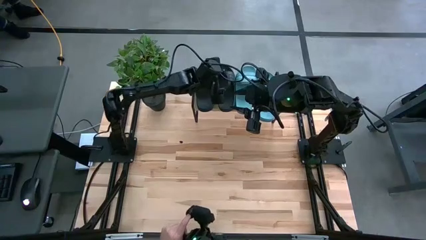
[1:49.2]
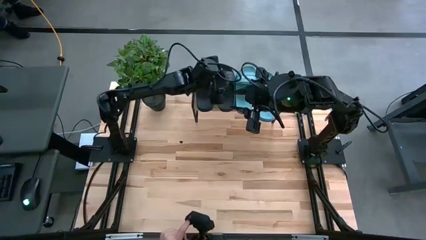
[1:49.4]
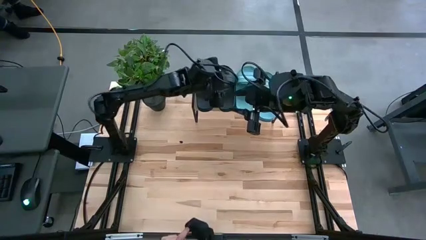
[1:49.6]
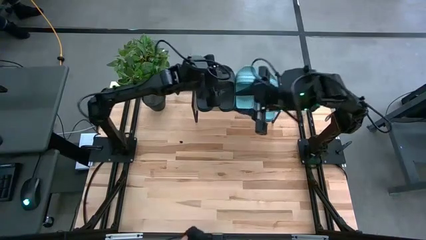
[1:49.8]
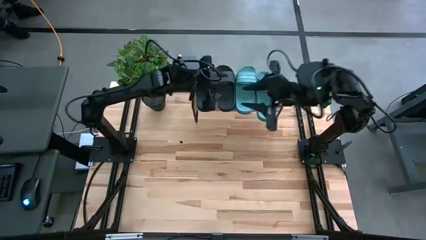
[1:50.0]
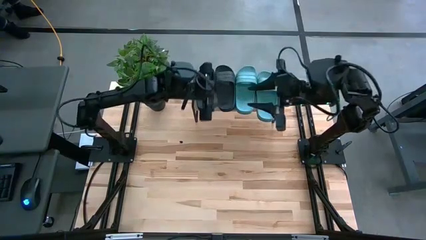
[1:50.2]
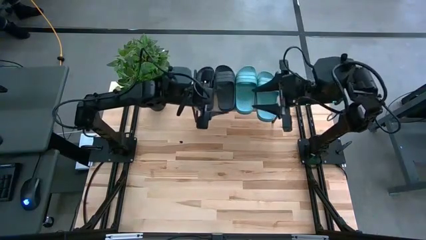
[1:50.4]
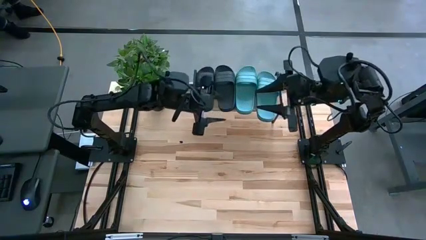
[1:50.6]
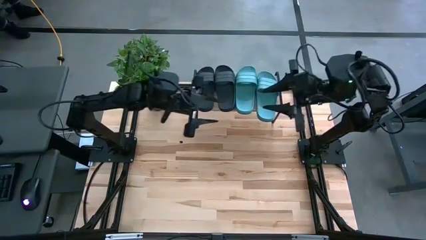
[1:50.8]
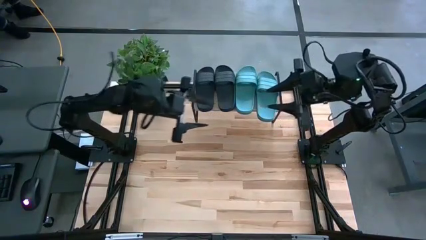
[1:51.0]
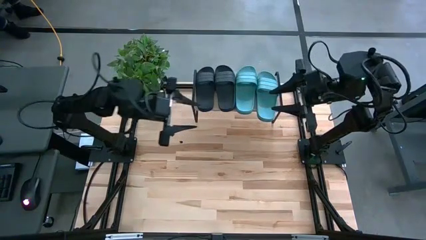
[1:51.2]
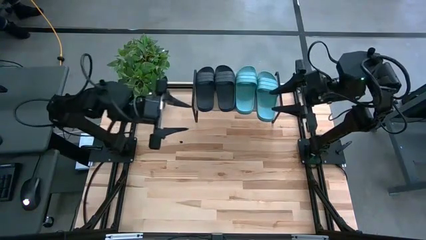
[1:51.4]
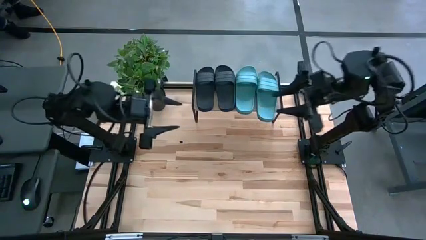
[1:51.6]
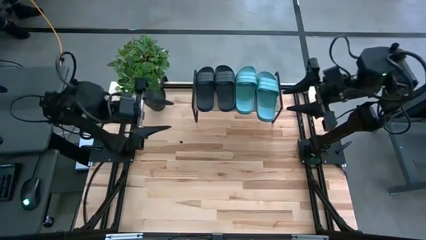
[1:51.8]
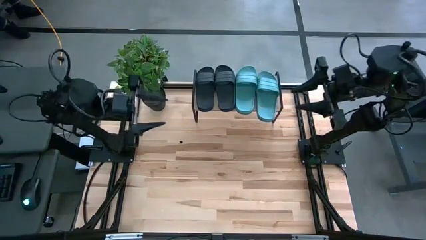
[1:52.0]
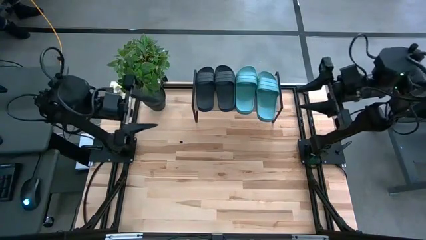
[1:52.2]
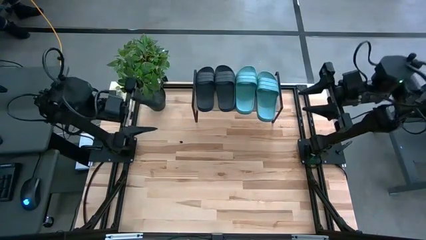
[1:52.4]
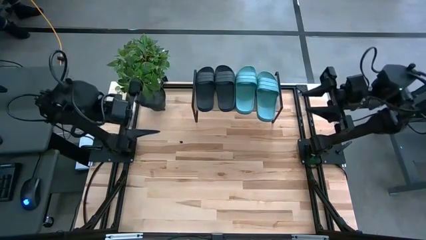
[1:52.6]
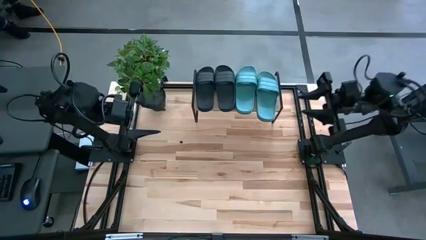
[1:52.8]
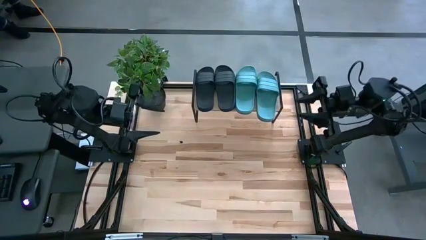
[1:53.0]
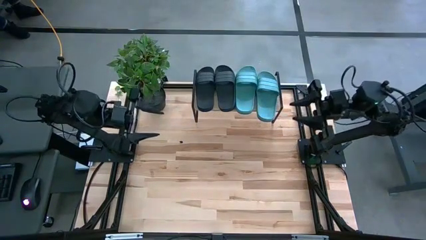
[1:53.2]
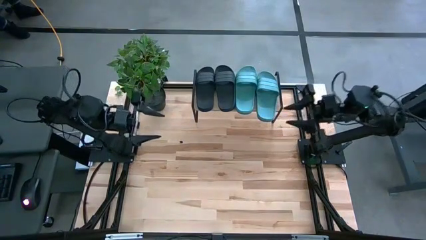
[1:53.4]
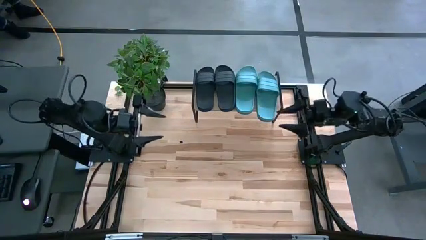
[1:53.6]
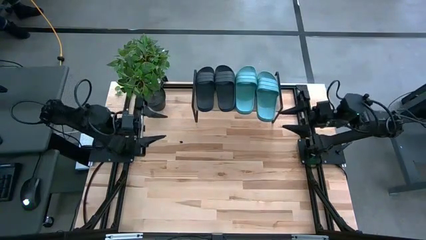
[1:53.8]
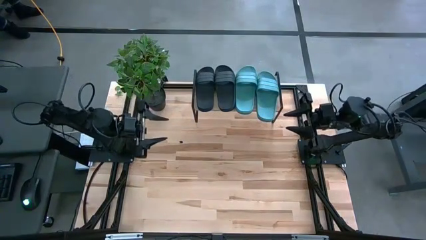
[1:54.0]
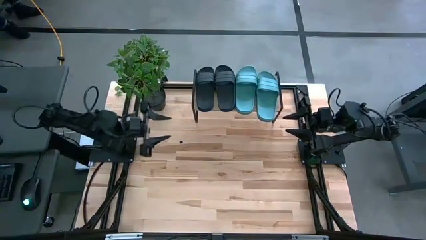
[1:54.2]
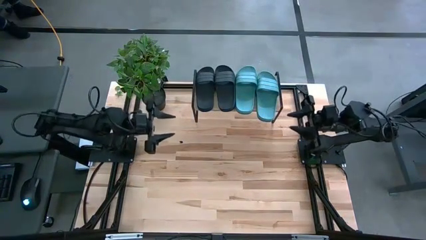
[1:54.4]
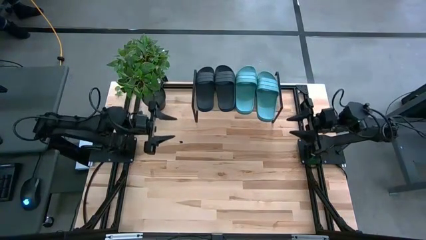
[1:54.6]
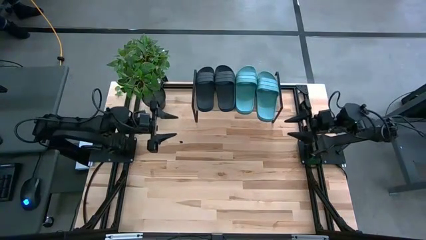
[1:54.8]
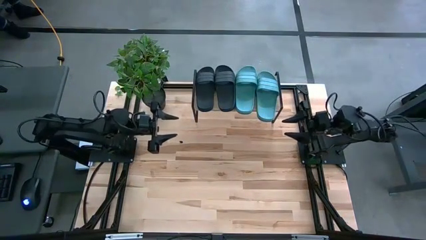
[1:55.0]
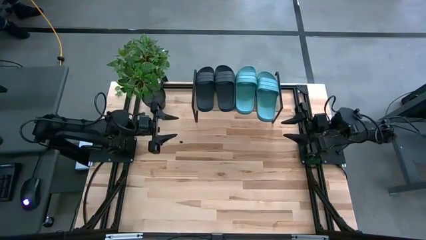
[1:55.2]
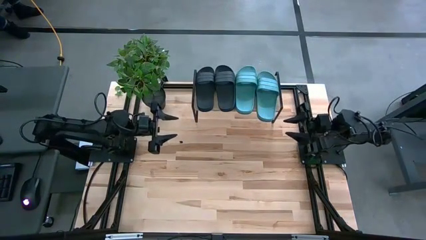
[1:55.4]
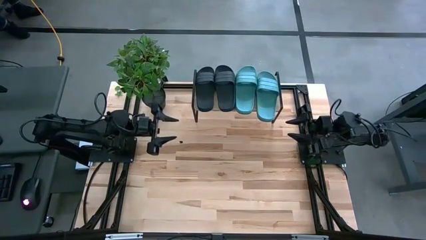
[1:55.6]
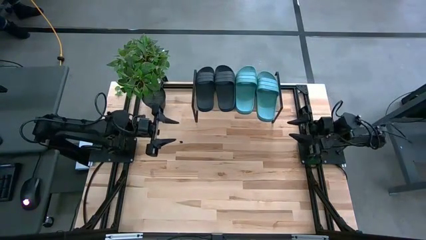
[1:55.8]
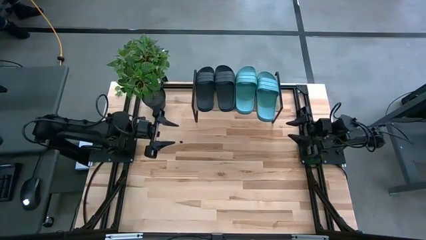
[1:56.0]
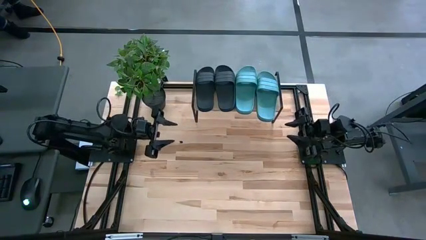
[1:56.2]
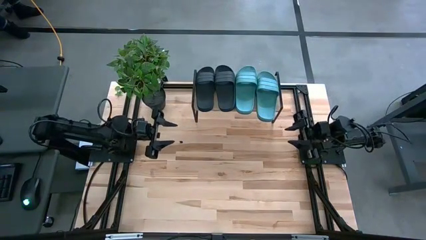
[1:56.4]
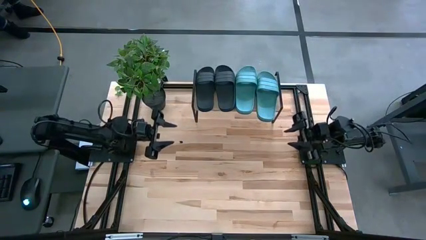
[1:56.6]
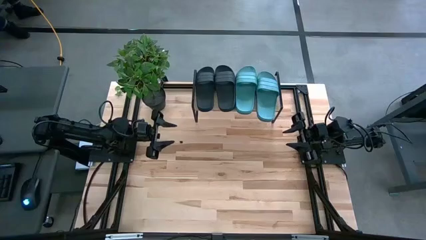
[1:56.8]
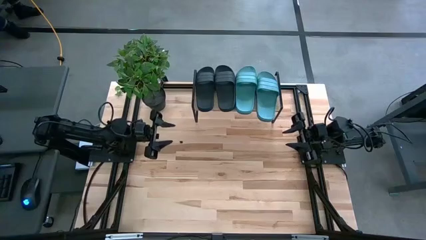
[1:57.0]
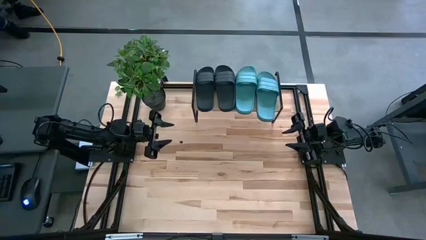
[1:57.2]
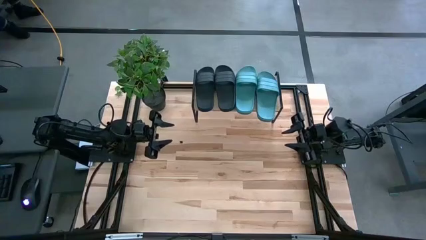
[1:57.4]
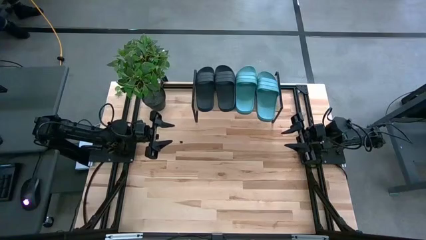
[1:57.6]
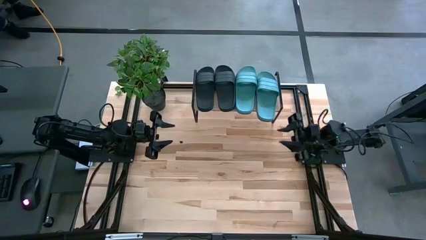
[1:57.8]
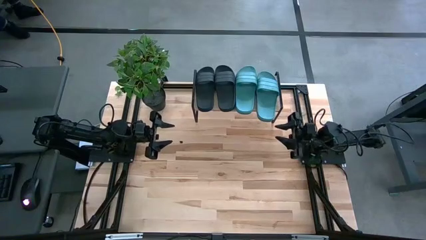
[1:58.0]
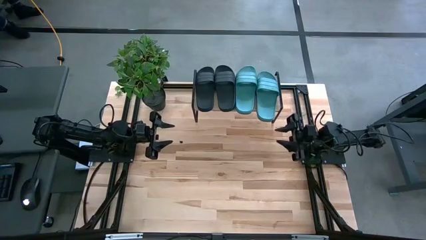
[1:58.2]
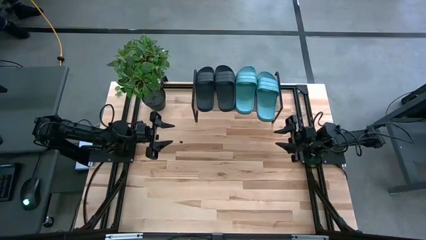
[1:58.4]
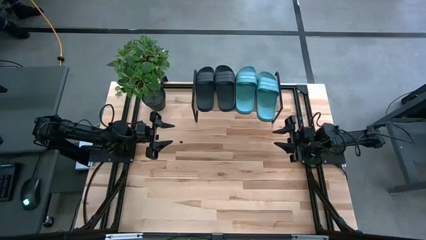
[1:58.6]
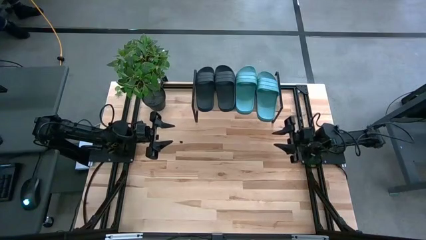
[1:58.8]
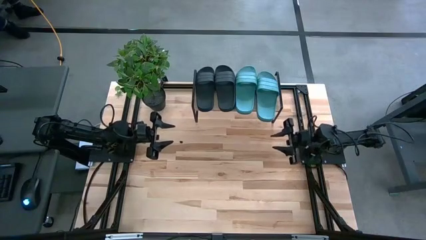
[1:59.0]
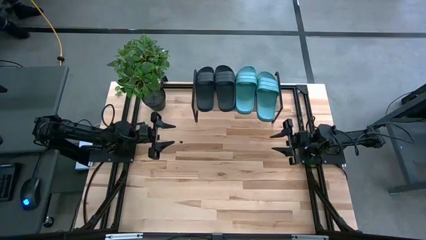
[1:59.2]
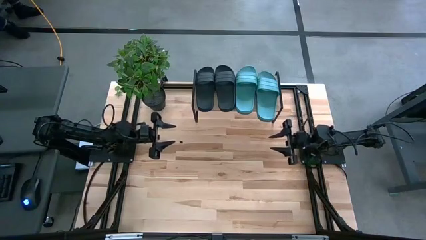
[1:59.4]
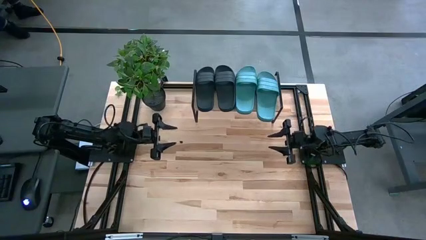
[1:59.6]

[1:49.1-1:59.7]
Task: Pick and place slides into the shelf
Return to Home Position
